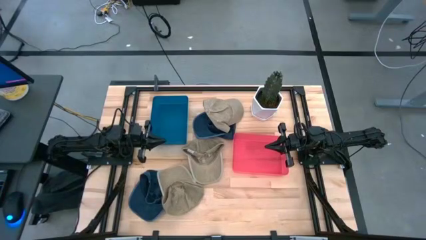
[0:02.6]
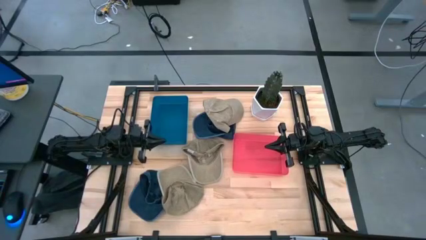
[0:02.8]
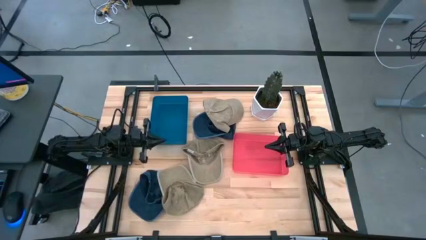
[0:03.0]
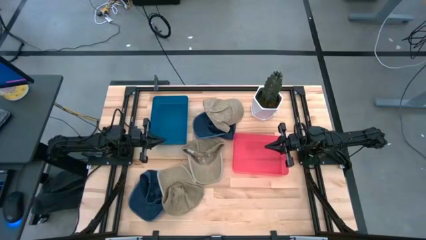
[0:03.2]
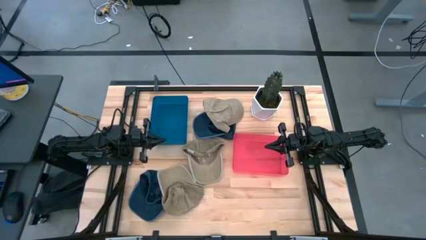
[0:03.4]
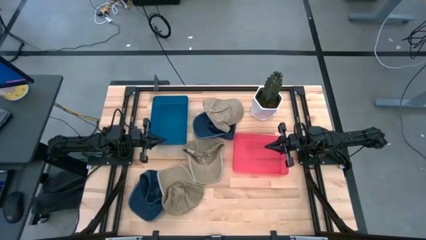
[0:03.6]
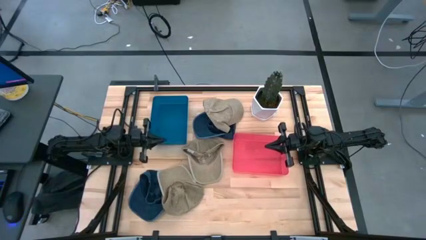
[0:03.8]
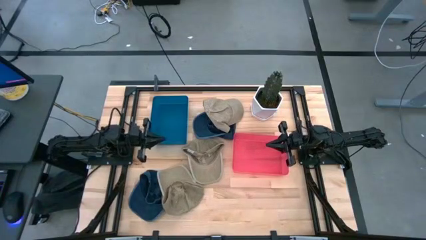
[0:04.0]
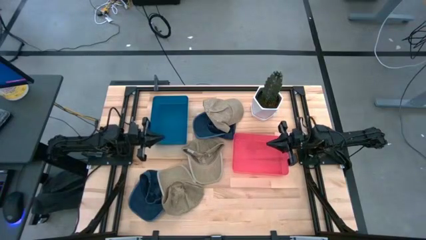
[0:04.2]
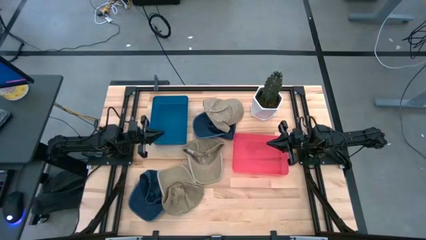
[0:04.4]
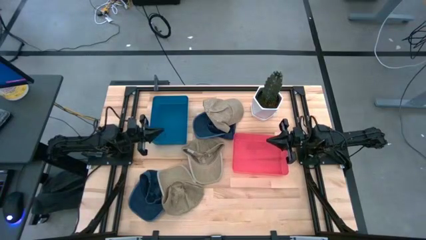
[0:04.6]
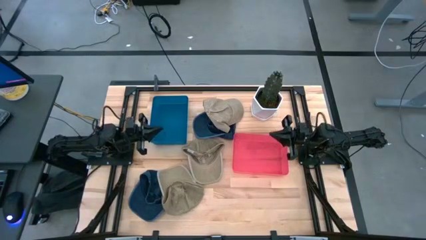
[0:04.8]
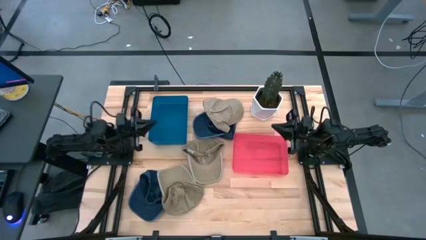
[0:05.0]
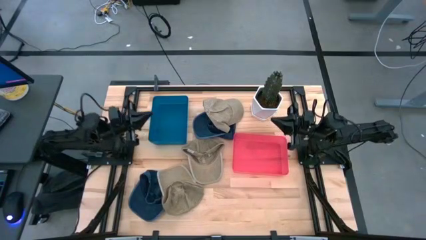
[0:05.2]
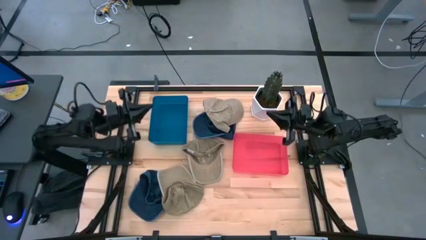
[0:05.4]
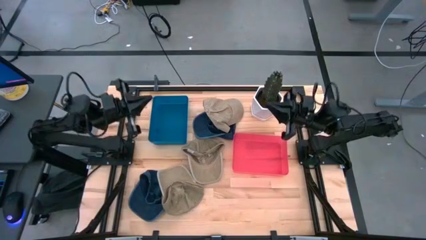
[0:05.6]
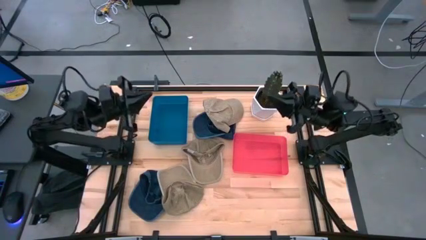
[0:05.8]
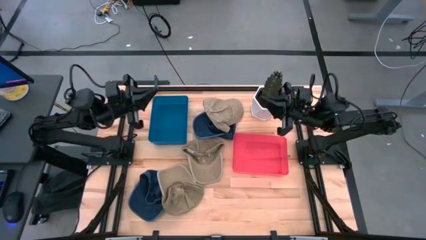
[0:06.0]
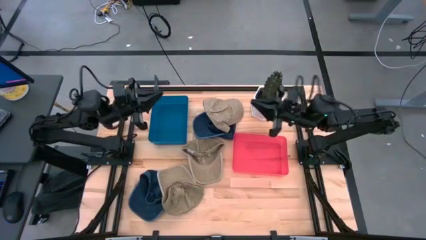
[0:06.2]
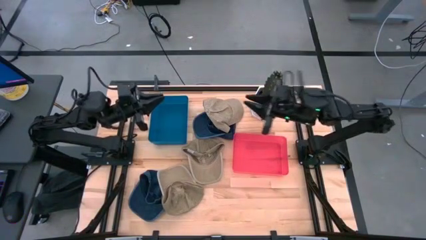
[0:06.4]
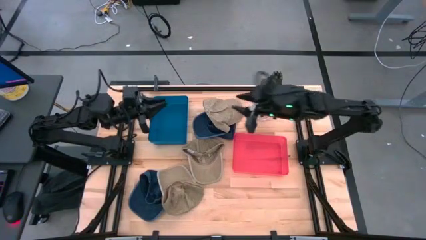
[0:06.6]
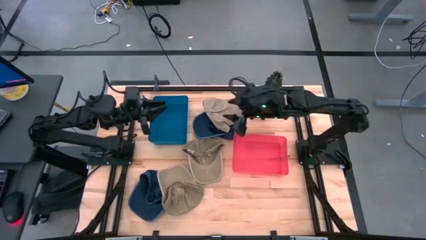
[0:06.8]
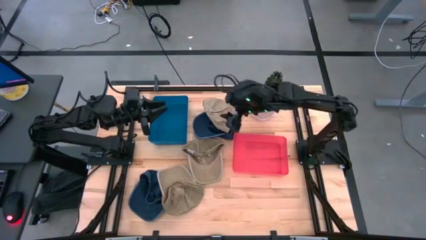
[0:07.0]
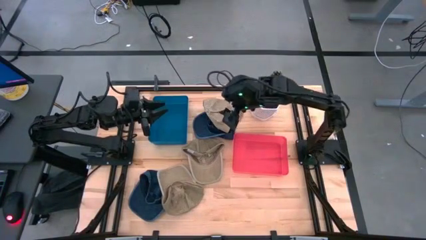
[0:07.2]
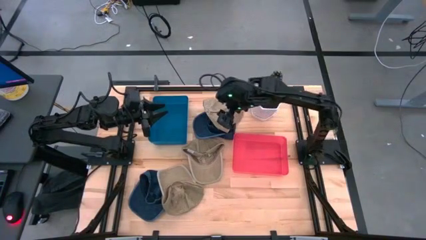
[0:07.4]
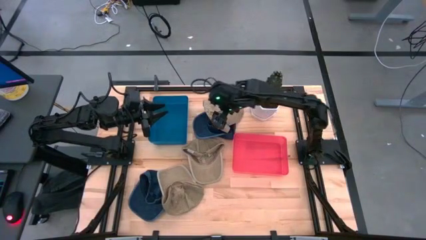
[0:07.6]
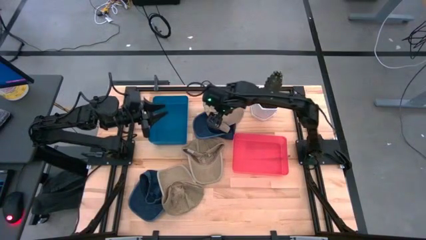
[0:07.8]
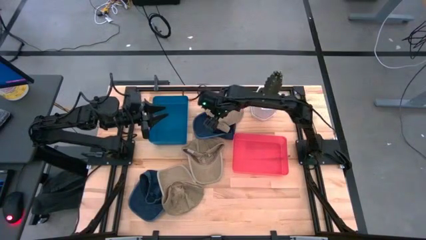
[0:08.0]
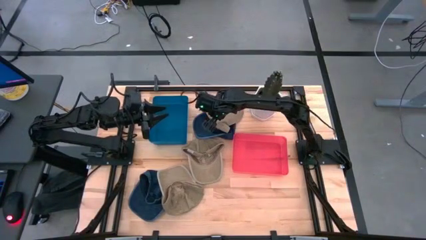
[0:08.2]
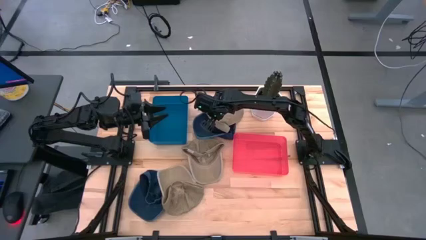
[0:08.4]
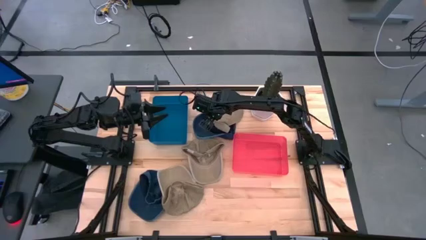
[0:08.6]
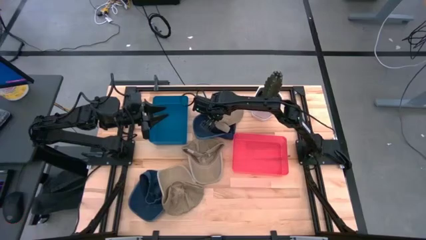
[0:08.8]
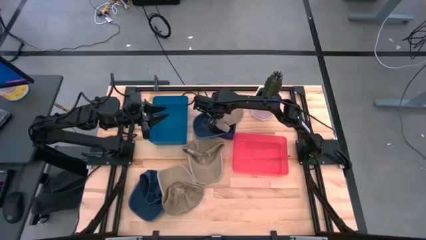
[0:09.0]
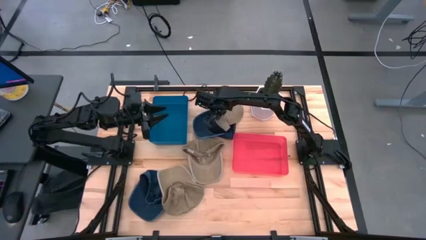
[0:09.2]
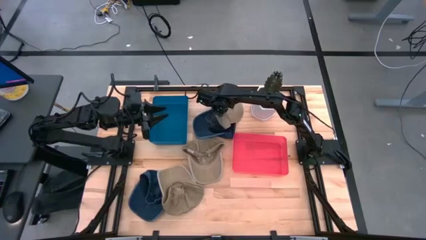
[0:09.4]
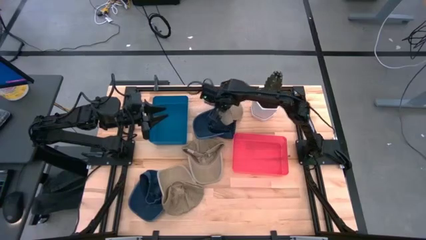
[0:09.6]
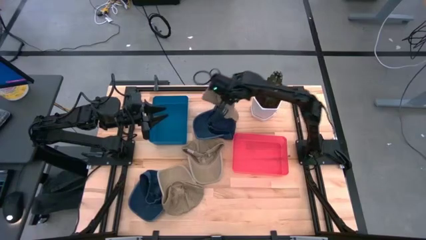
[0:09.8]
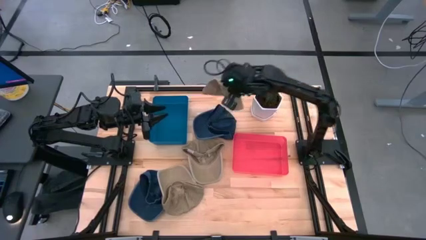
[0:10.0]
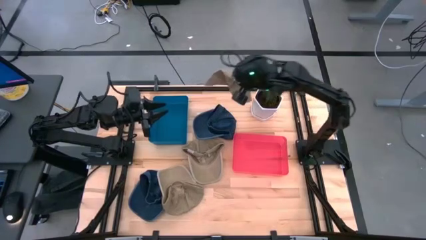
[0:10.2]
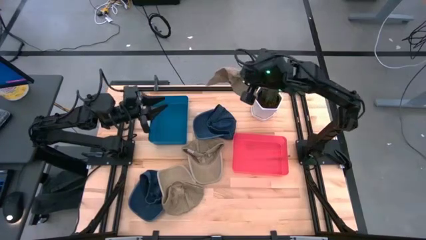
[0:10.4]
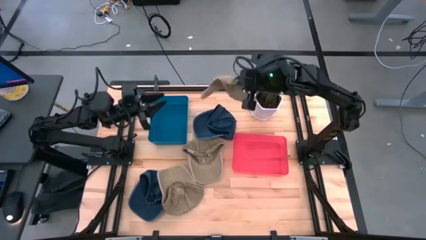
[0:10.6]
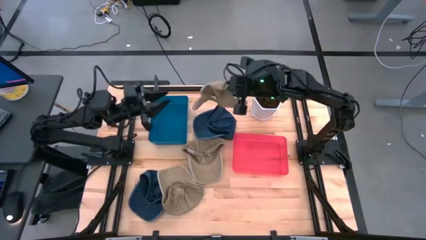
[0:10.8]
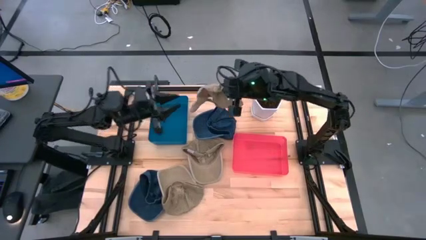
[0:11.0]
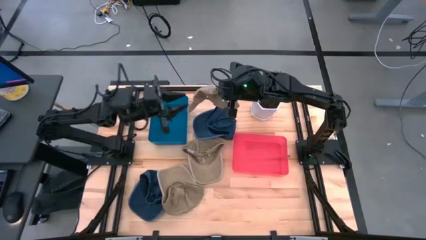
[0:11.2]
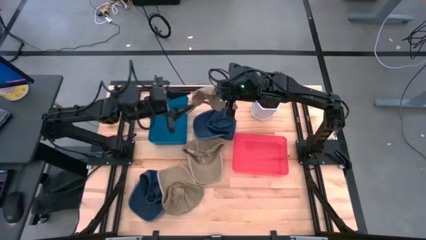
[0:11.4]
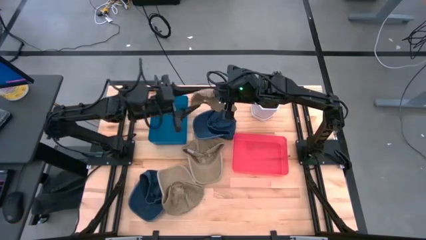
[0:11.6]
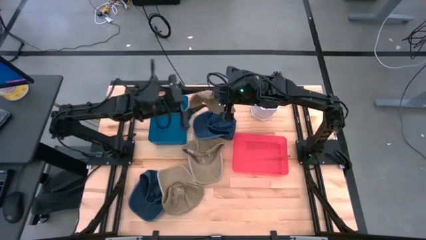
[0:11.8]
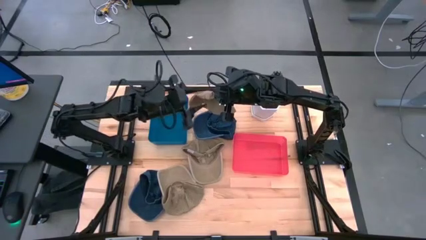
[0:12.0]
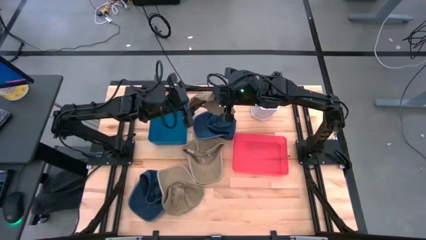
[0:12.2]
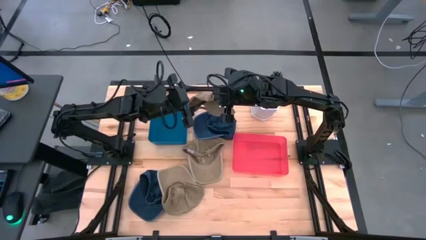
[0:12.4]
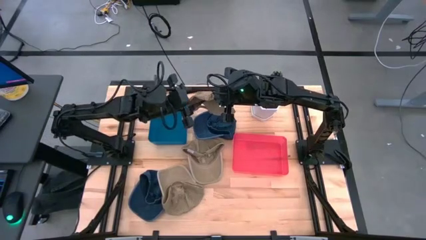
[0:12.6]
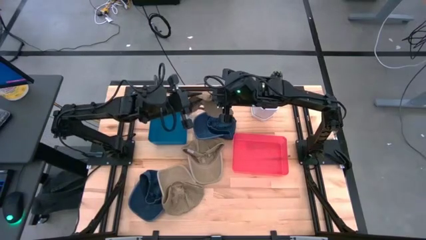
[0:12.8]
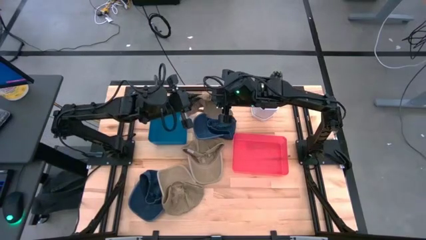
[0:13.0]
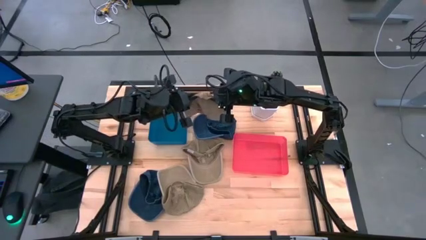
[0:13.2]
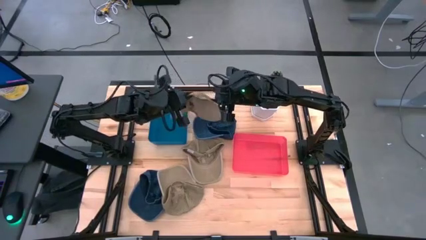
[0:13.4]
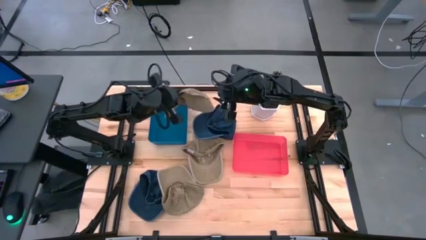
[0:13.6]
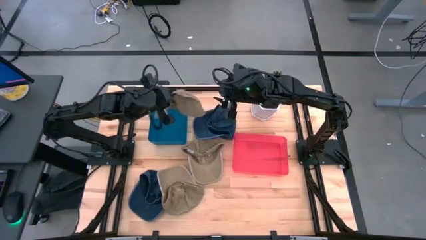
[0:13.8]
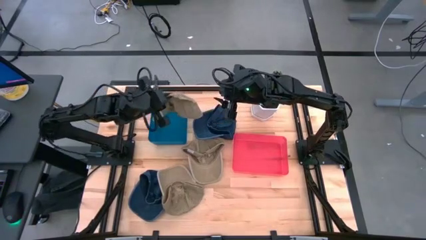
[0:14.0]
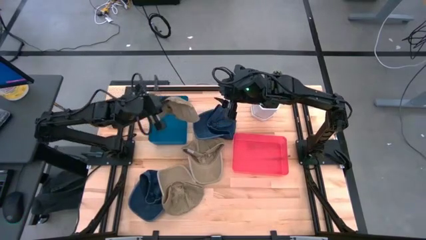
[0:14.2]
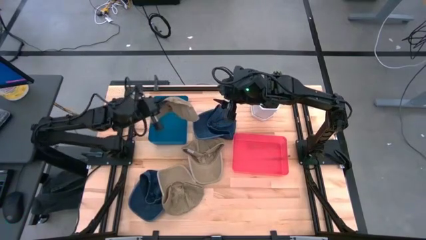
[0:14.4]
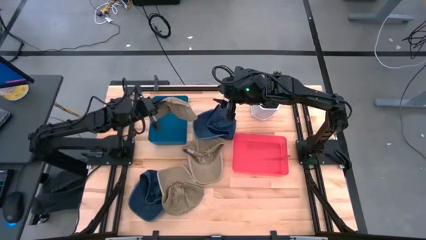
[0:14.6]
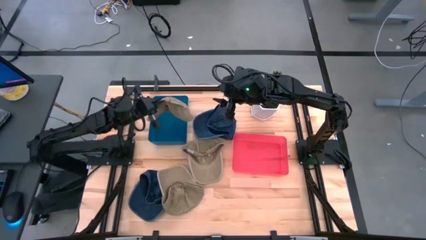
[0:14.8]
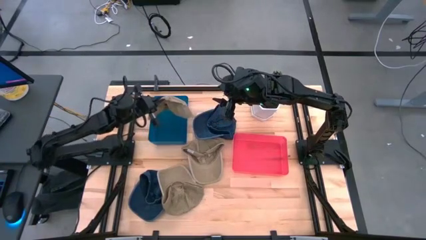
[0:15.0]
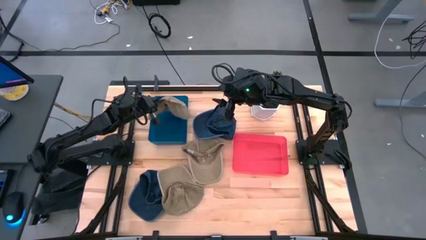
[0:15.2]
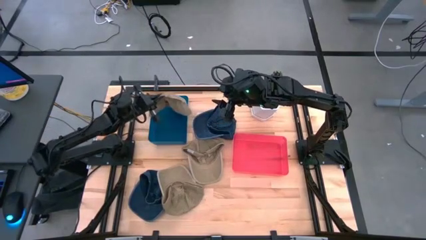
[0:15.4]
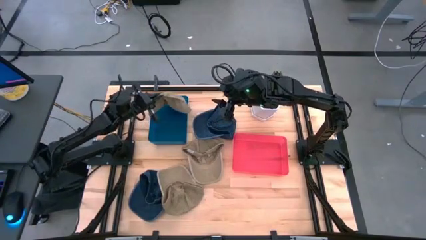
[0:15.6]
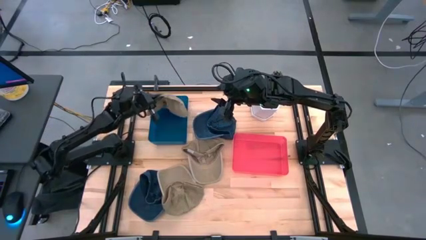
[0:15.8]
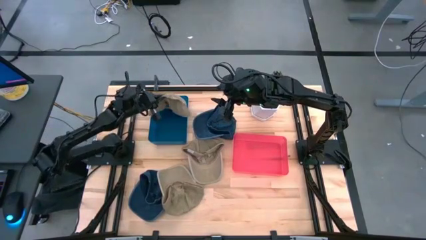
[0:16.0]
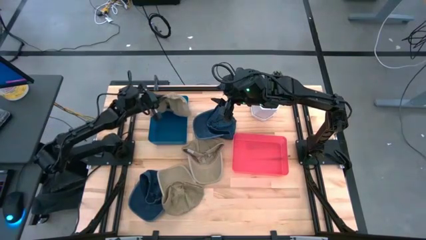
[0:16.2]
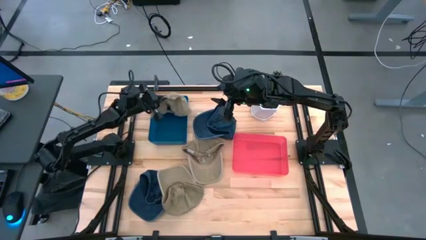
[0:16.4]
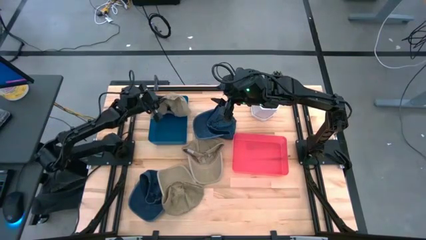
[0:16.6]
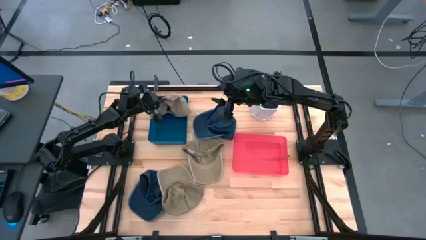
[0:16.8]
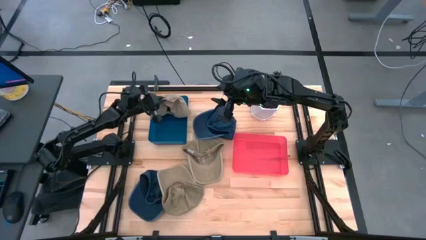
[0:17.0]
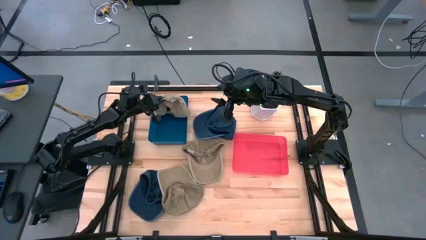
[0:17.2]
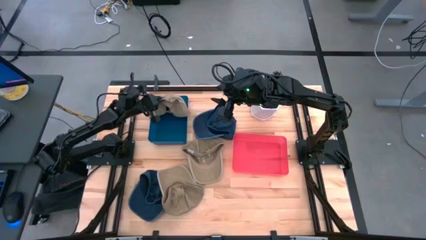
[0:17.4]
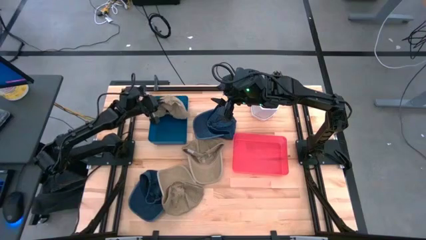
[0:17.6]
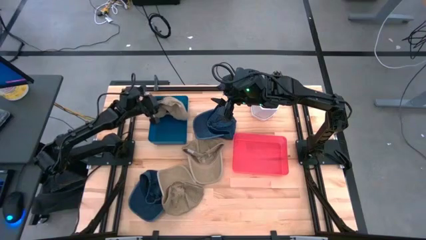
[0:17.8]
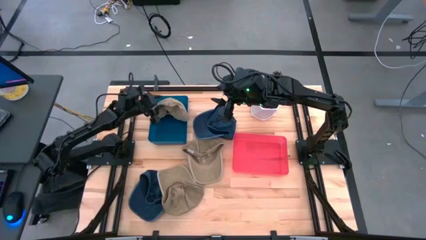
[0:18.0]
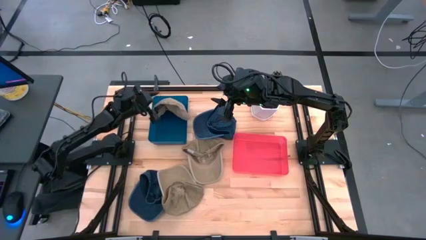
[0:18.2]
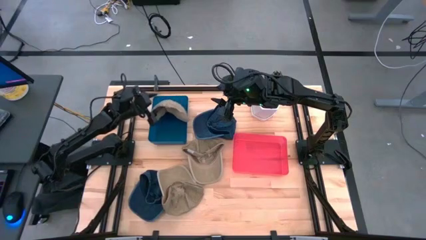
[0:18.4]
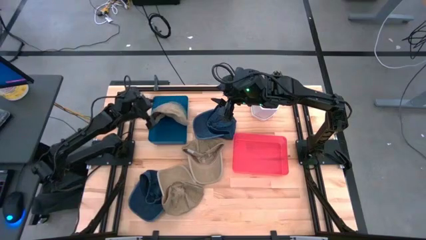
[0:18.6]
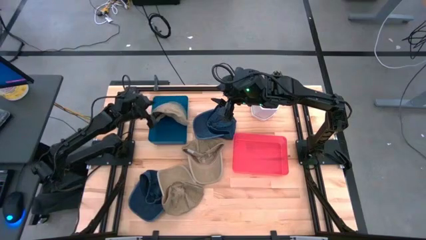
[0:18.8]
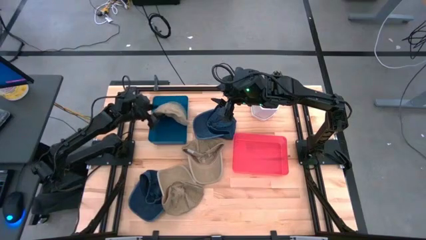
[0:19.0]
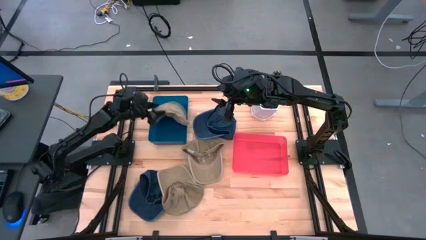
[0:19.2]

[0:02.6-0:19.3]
Task: Pick & Place hat
Put the top brown cap into the blue bin
